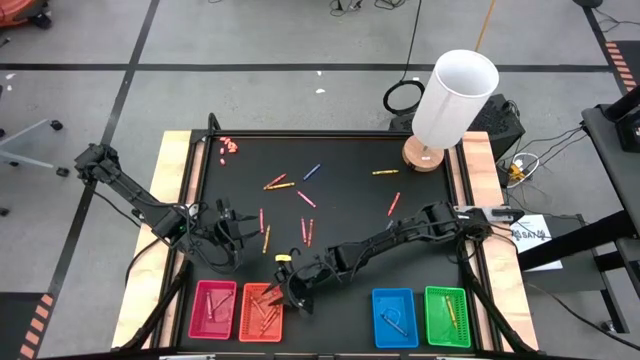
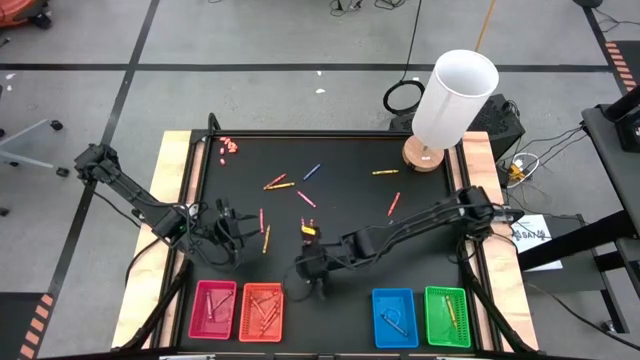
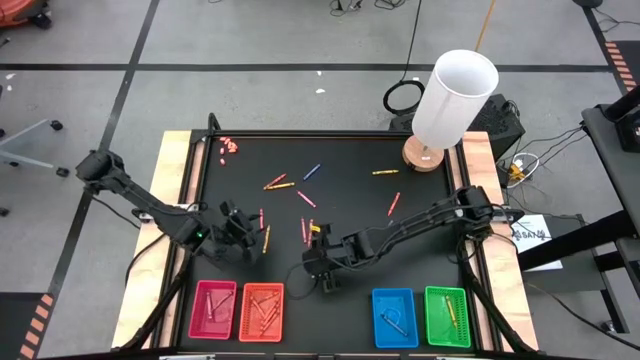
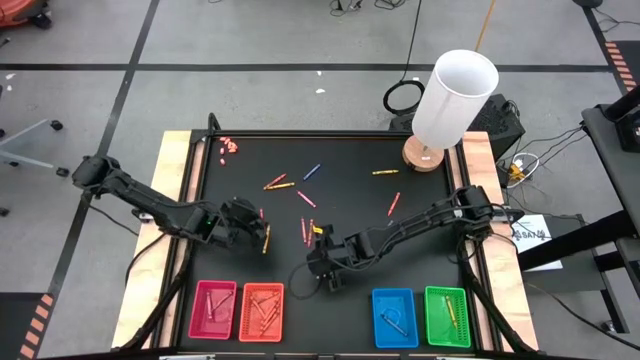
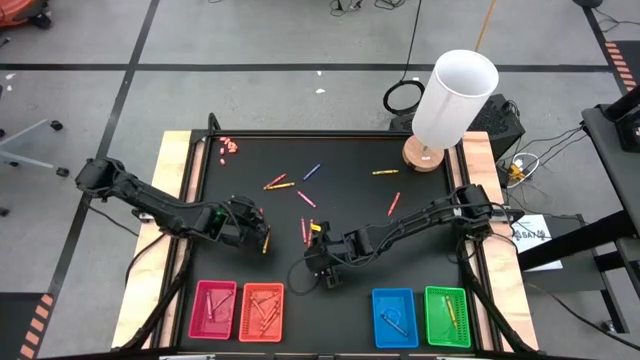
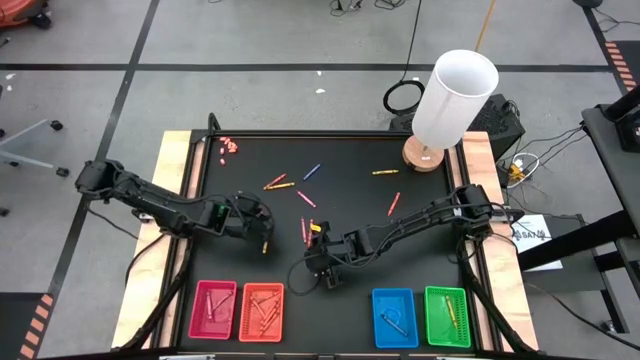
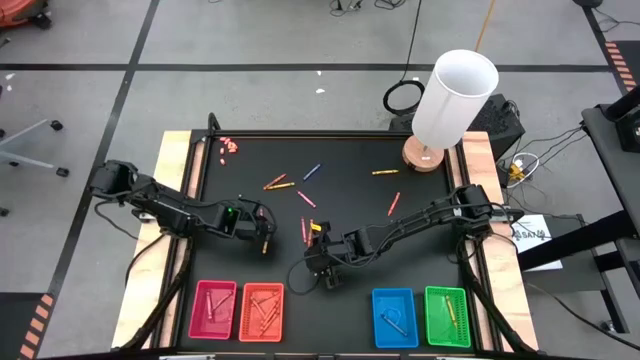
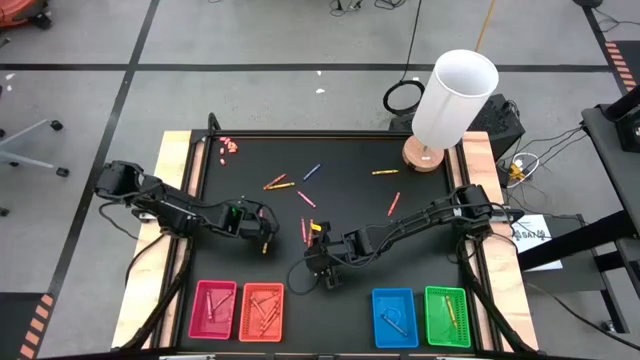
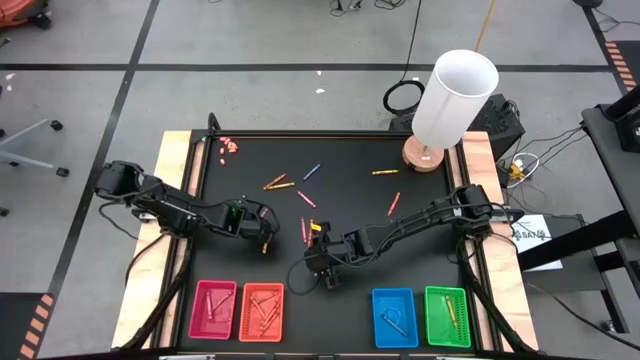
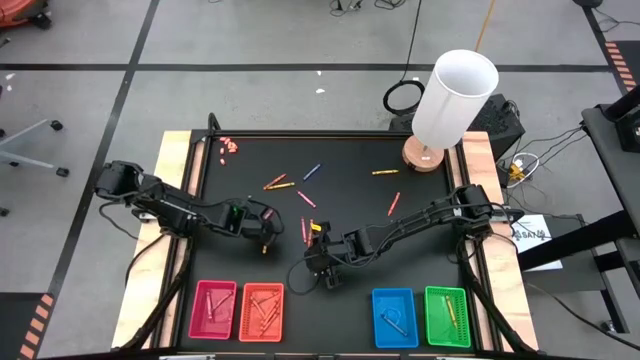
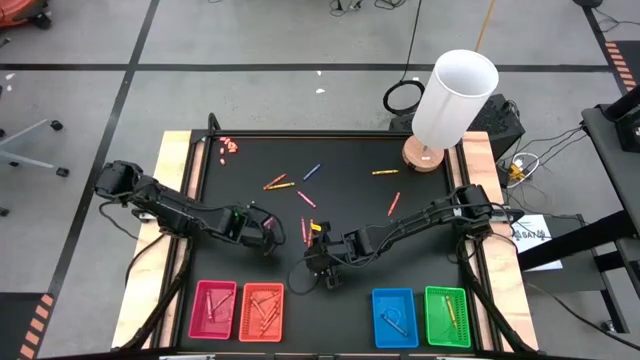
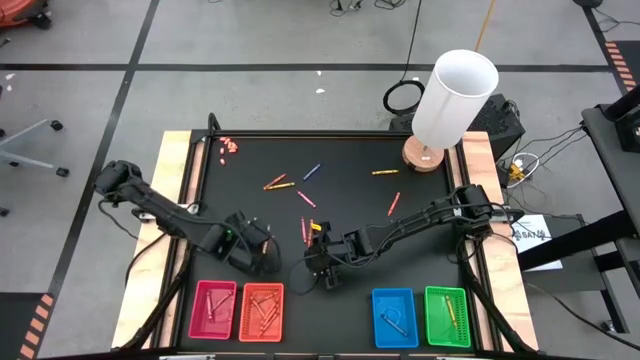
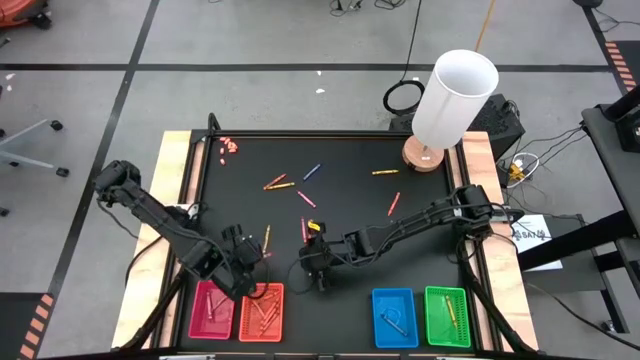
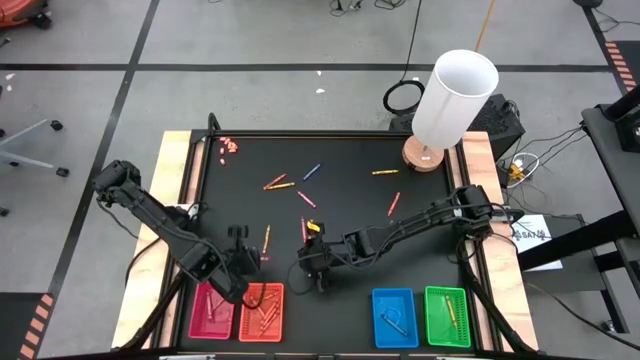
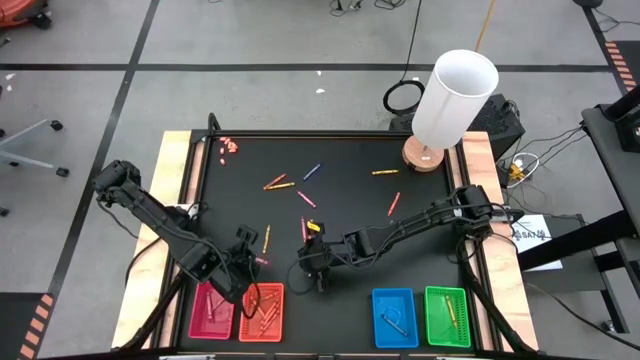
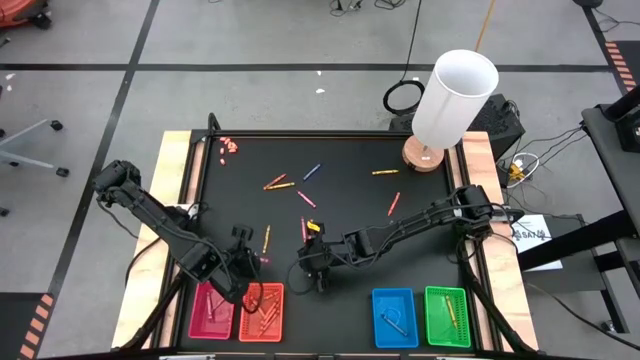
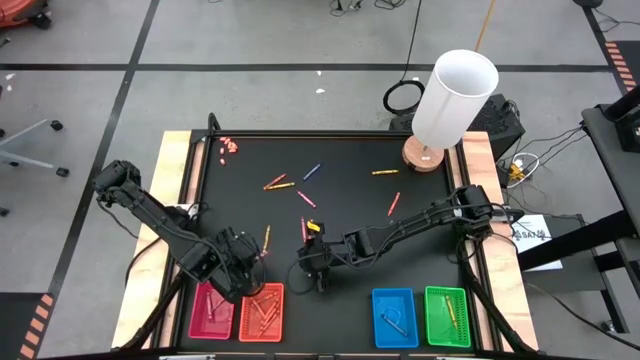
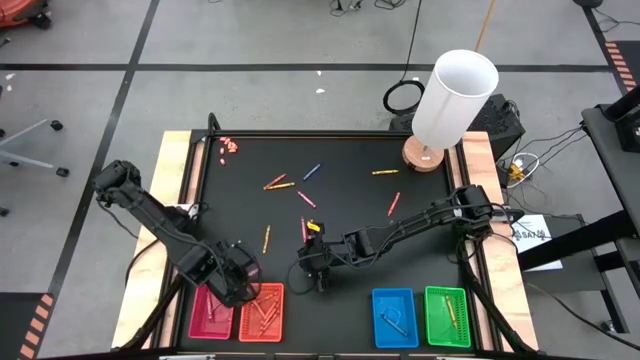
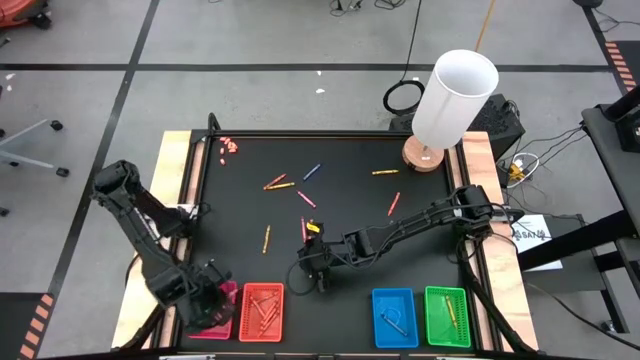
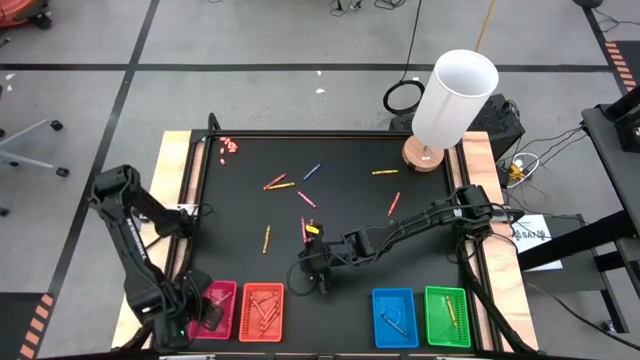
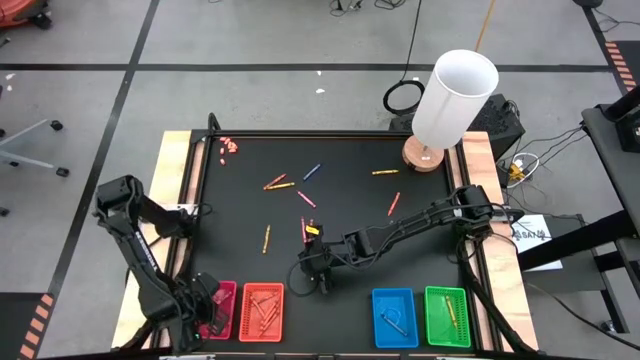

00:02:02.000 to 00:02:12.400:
Task: Sort crayons
Put the red crayon into the red bin

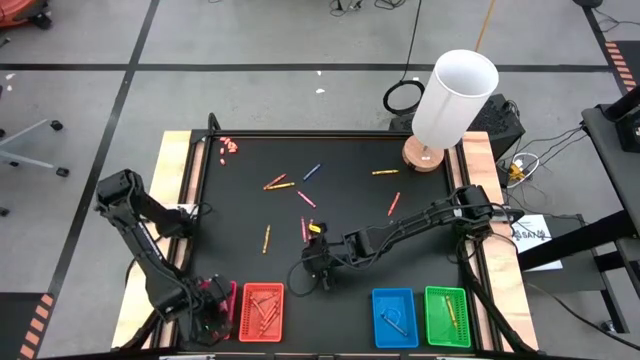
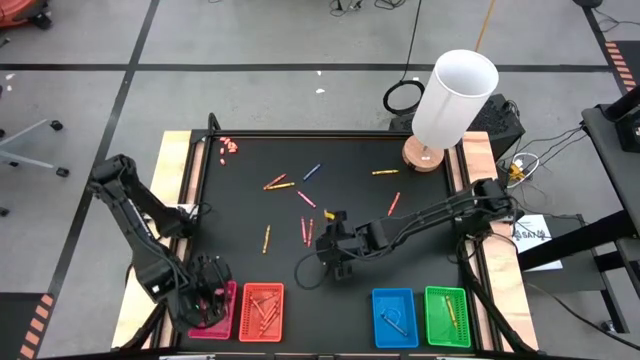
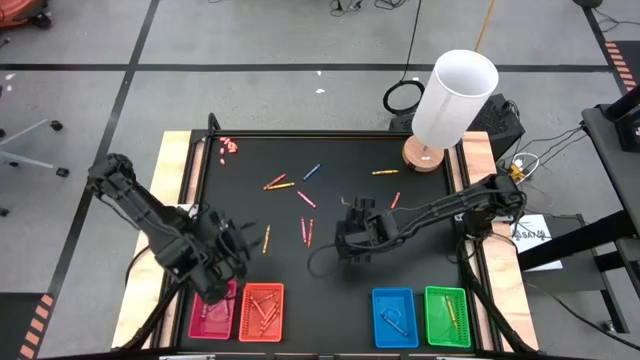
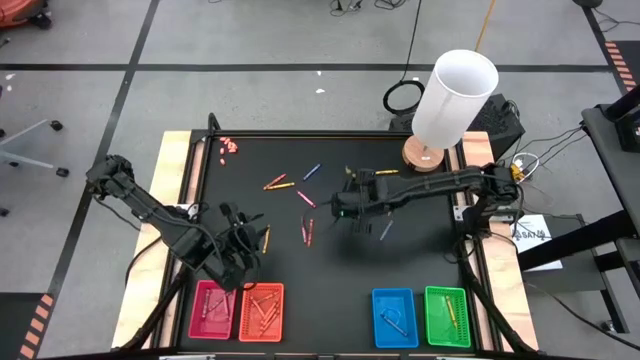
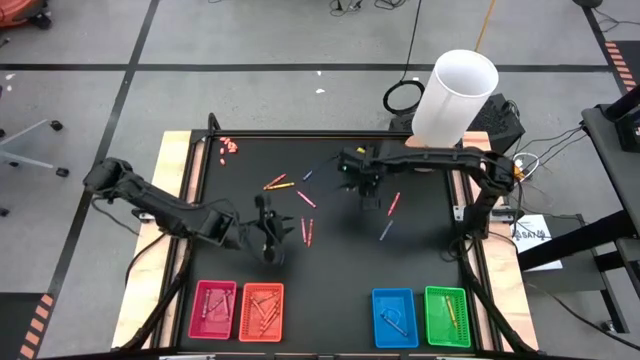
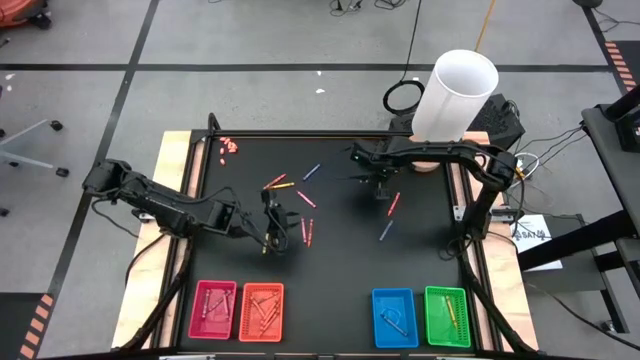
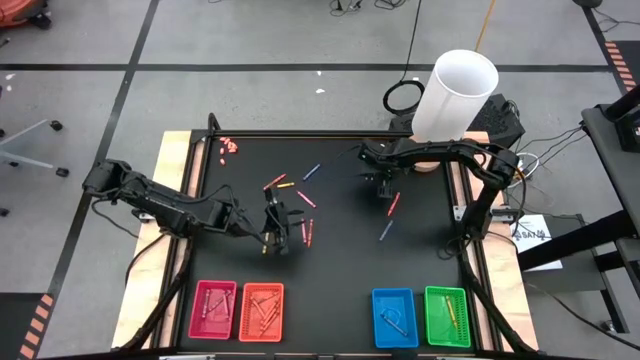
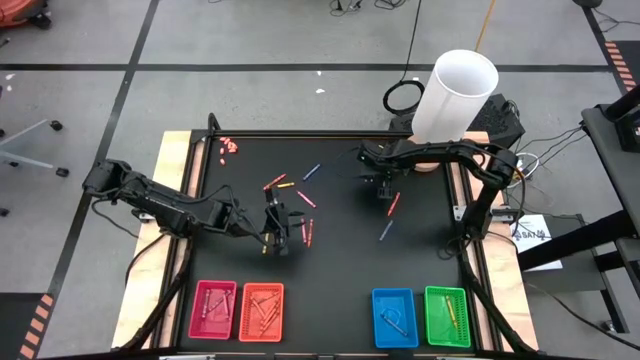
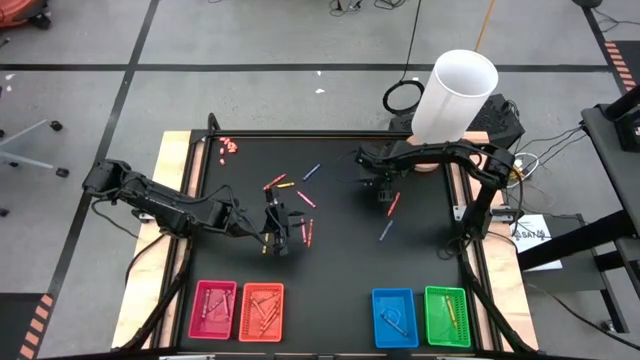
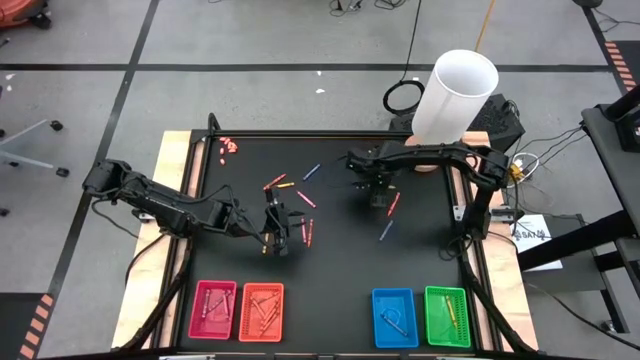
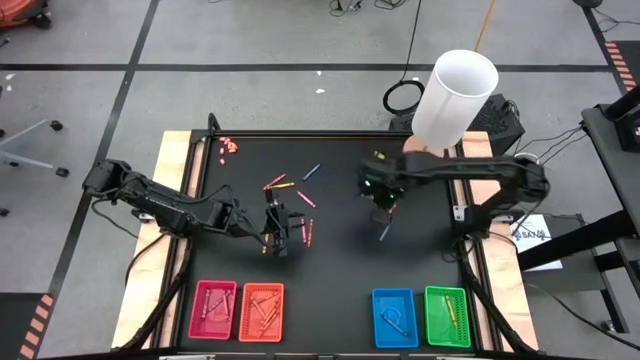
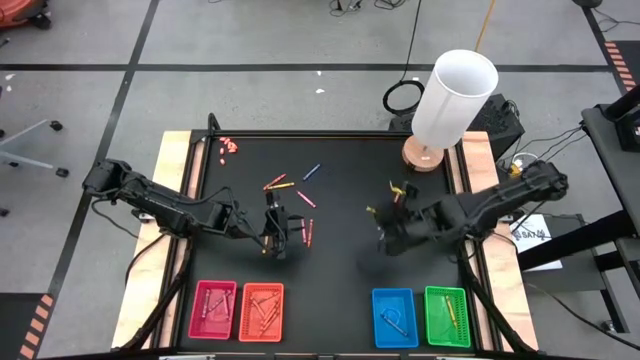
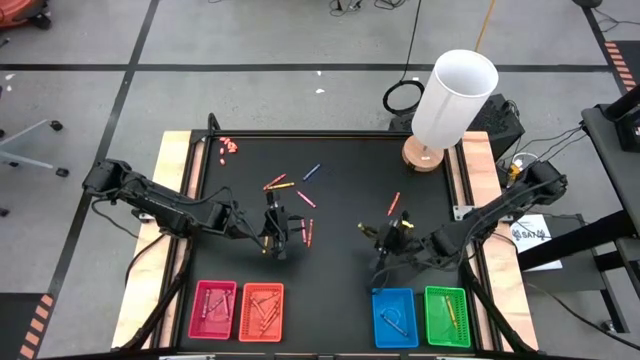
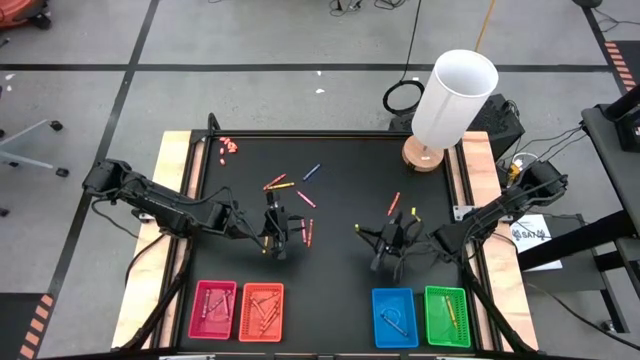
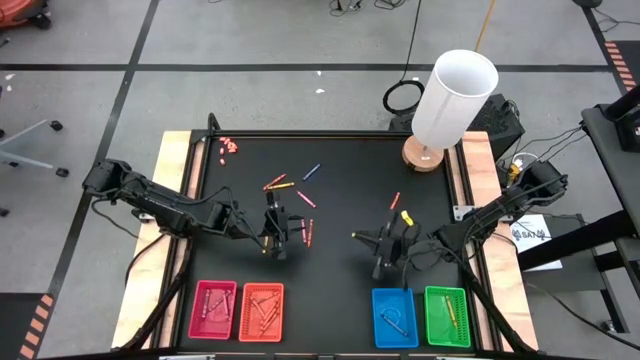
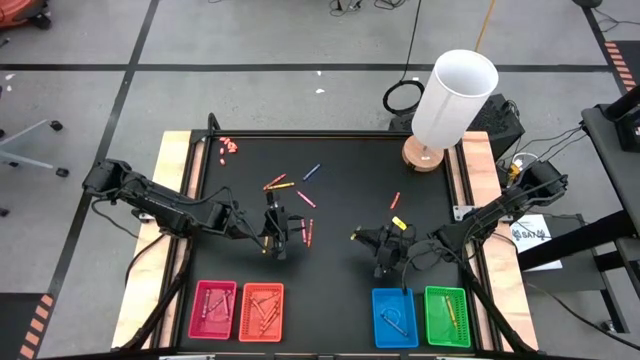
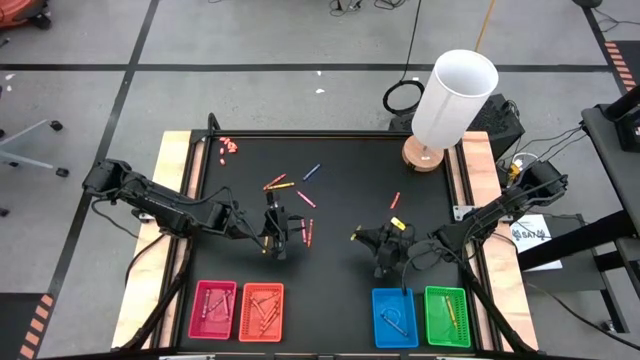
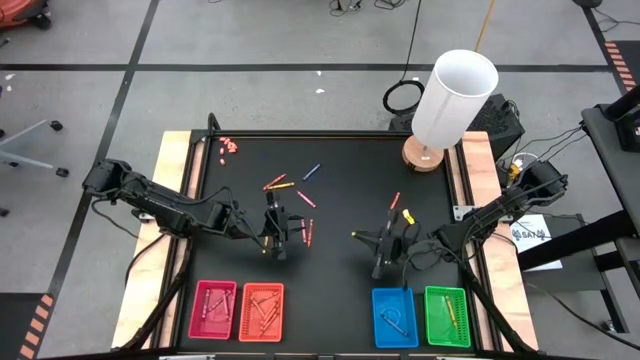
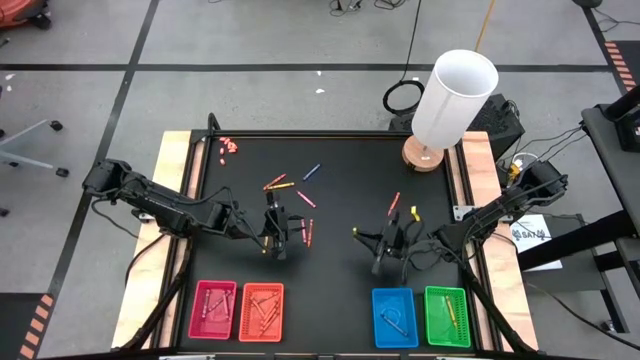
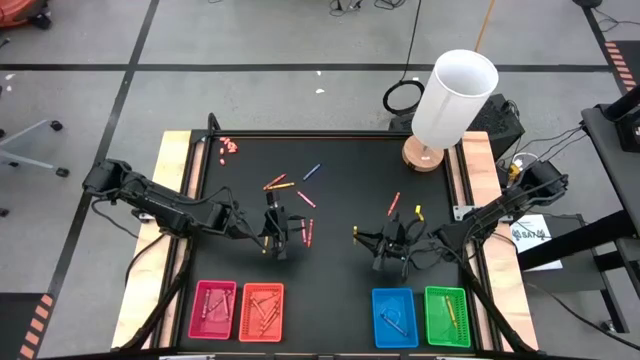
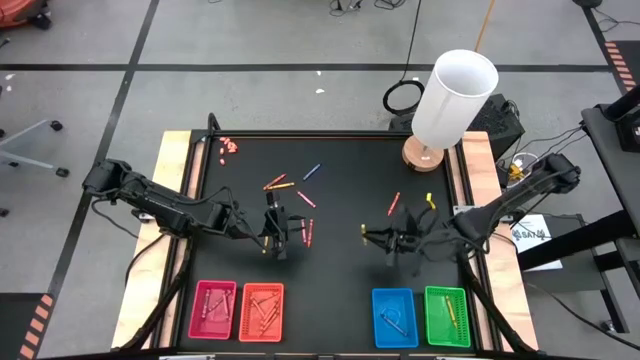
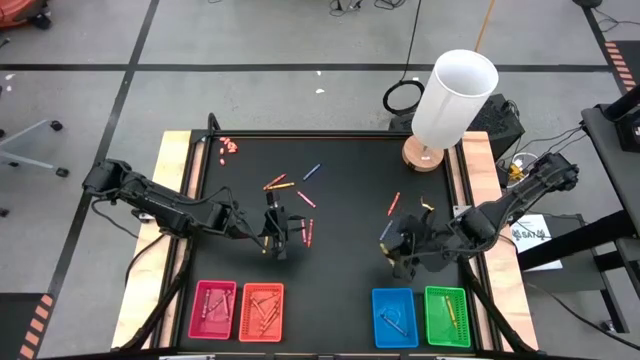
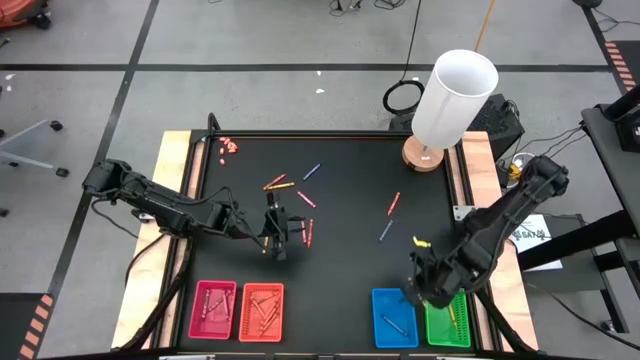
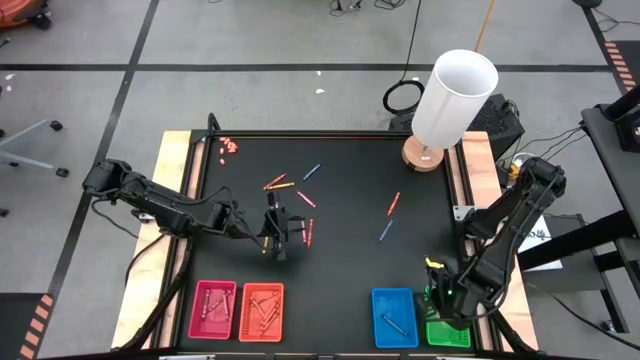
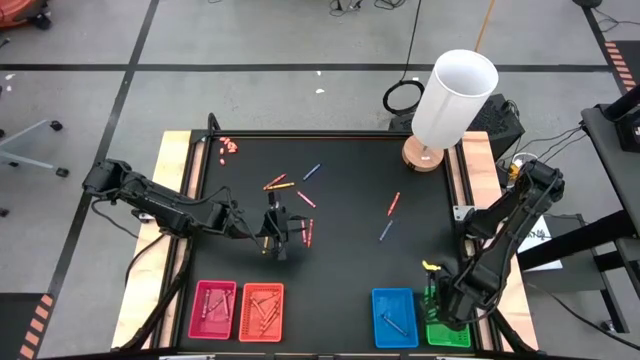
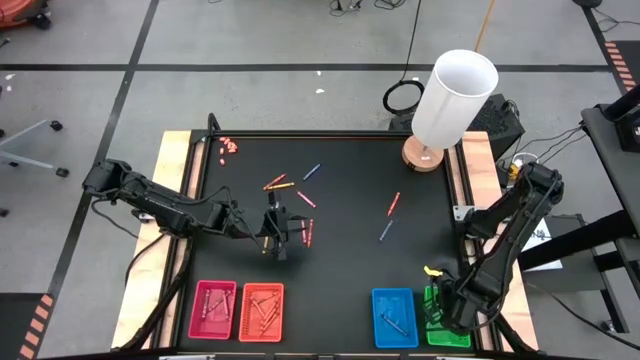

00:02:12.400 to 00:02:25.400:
Put the green crayon into the green bin
